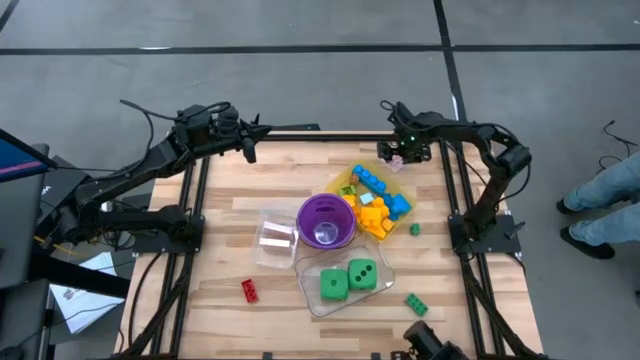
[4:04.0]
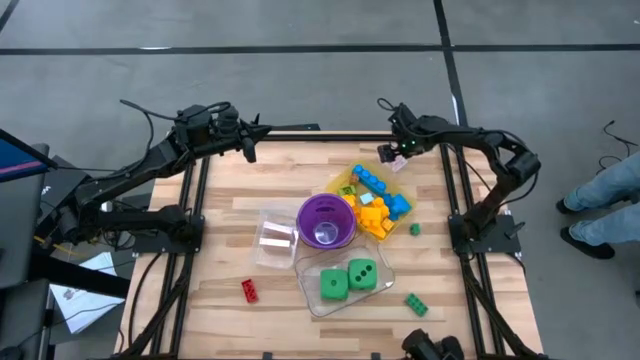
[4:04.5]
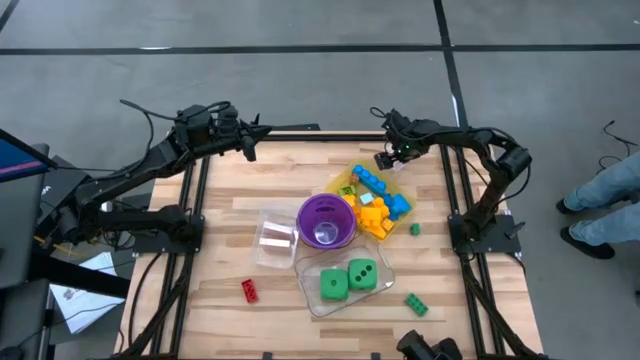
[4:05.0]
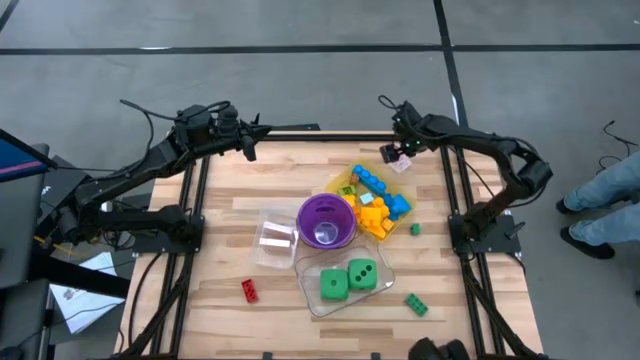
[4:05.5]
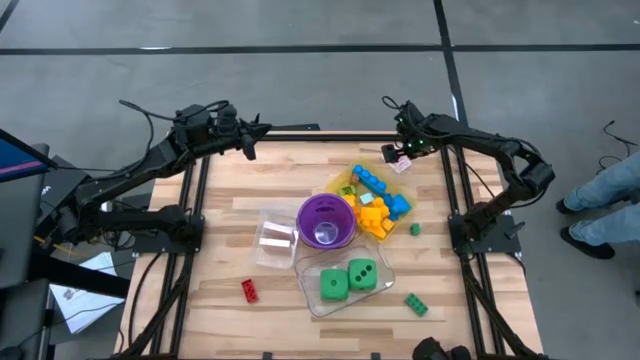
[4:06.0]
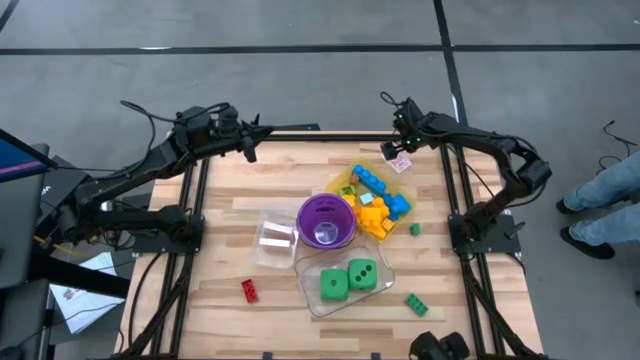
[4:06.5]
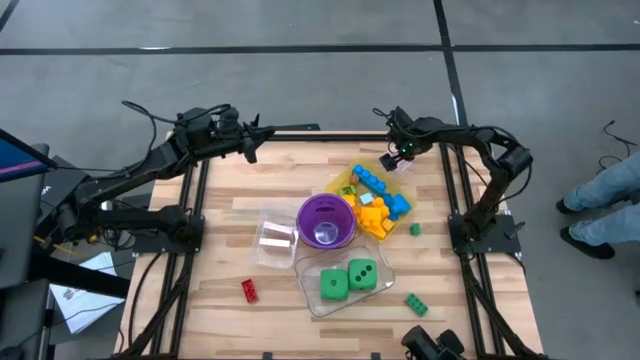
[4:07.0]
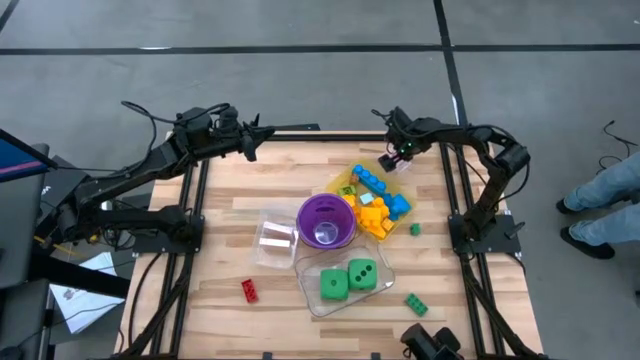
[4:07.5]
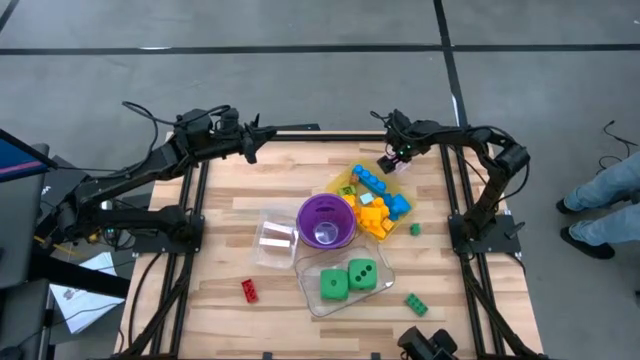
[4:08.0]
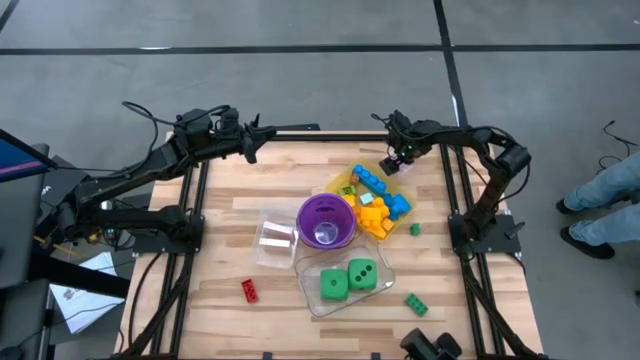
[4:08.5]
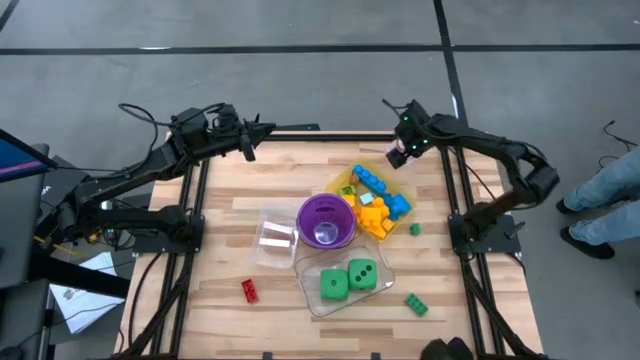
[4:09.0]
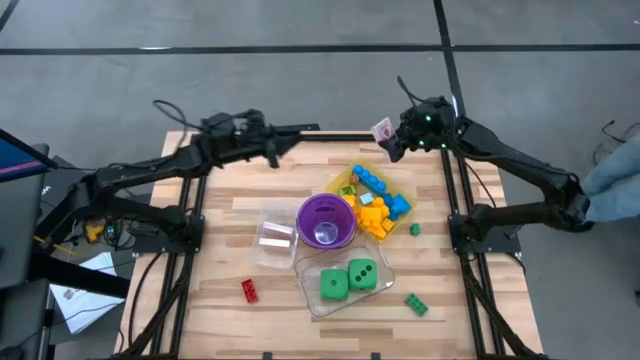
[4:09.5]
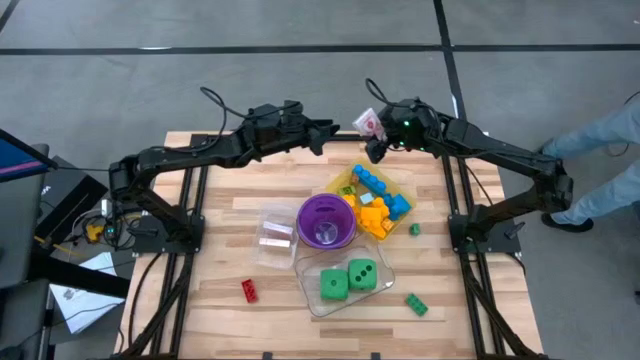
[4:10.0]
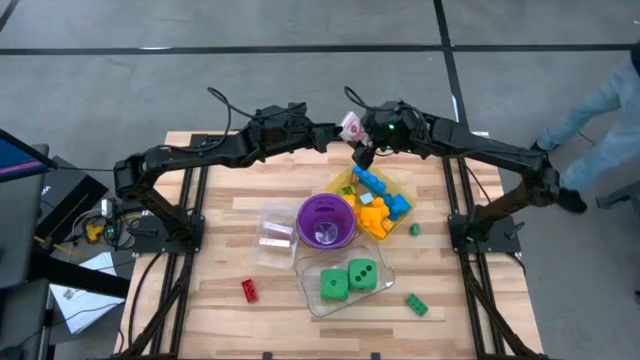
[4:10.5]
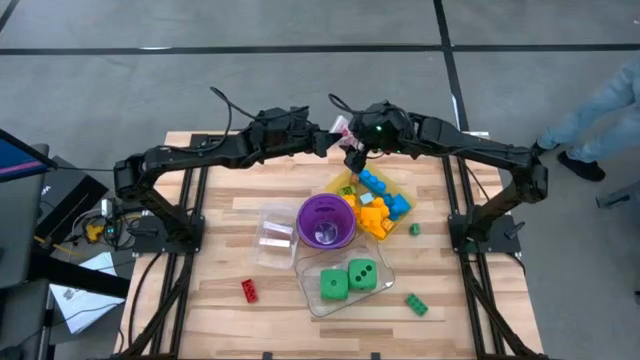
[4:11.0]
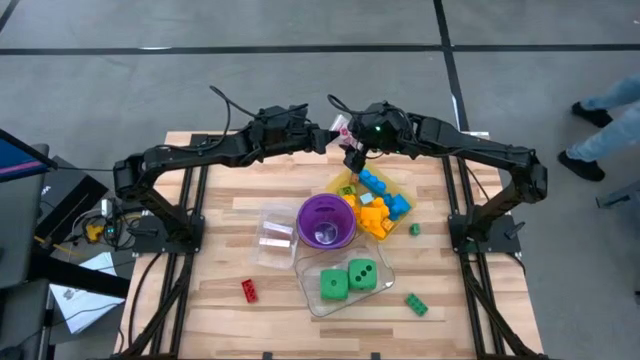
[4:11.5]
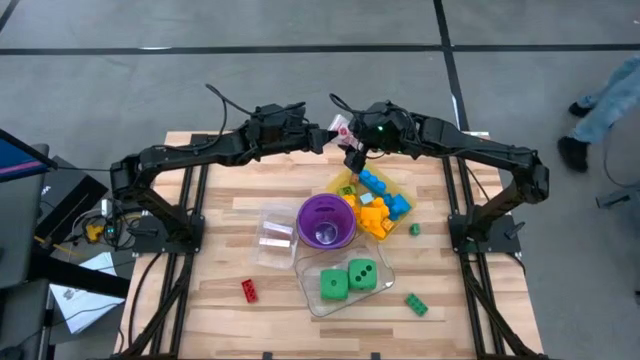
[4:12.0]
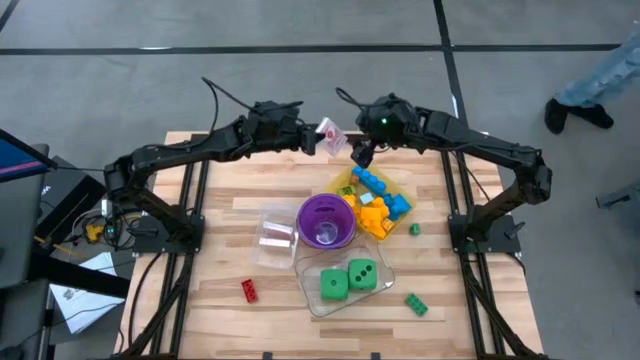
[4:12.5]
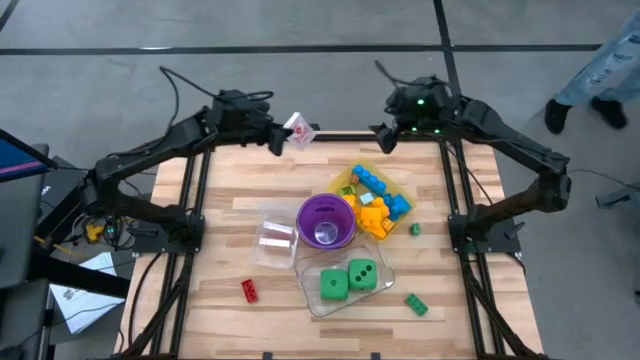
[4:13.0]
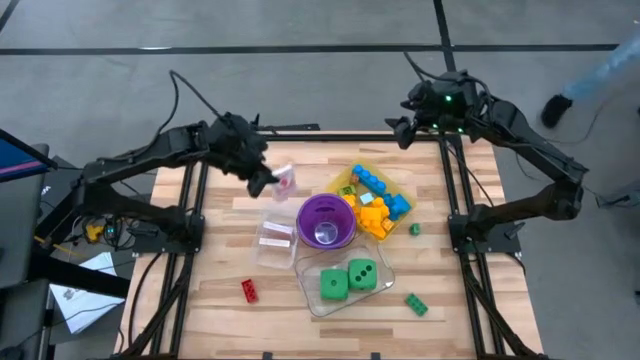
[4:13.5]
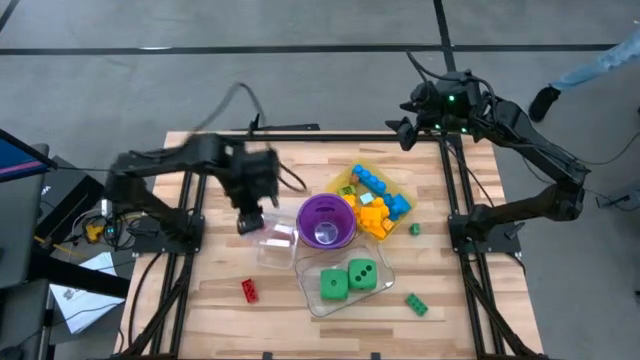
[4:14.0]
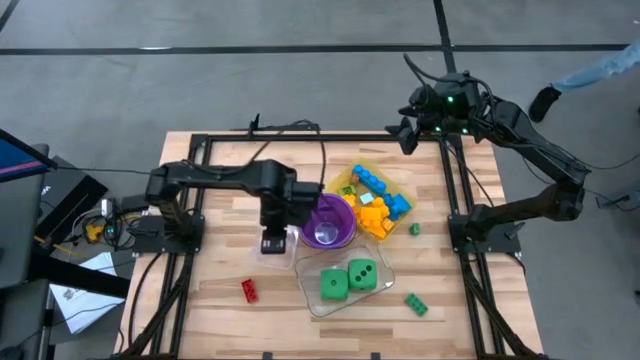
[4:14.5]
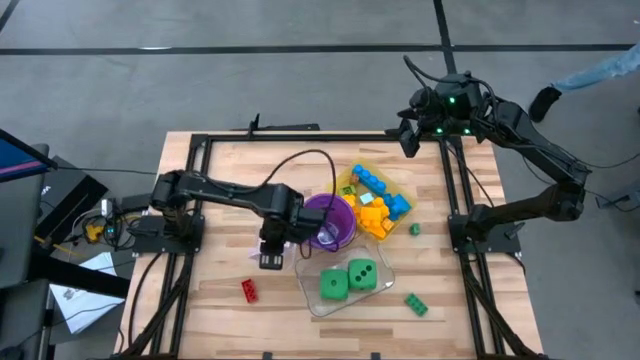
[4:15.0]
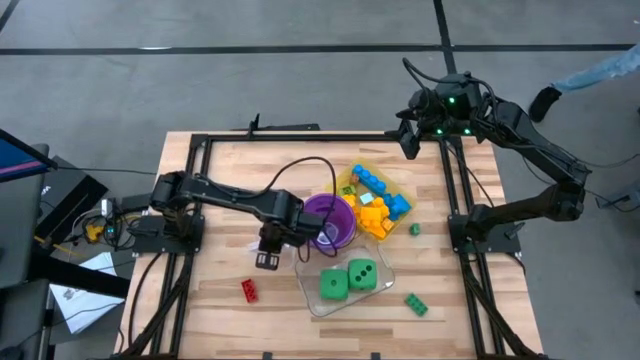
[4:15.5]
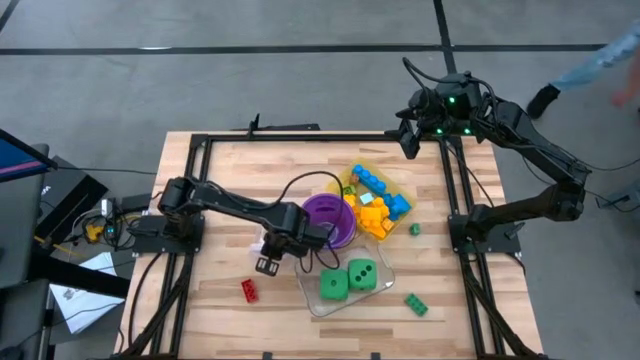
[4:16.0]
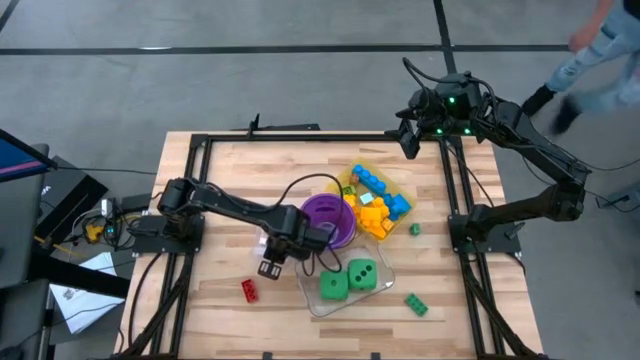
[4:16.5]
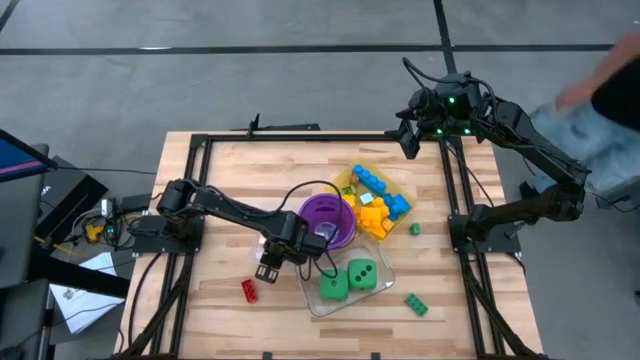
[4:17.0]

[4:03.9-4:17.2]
Task: Pick & Place Toys
Put the red deck of cards into the white bin

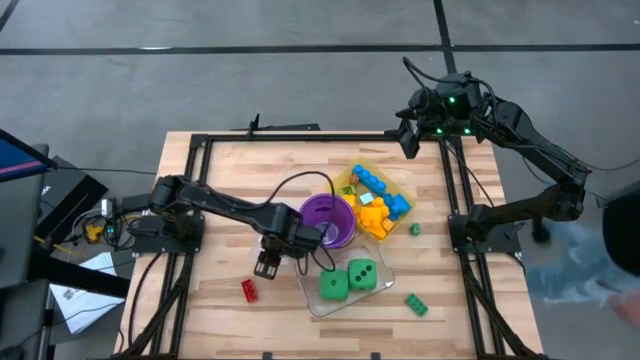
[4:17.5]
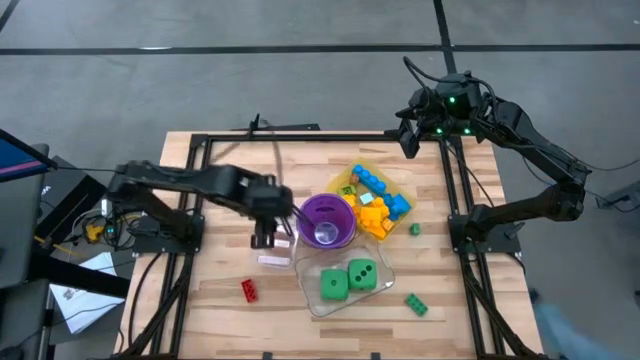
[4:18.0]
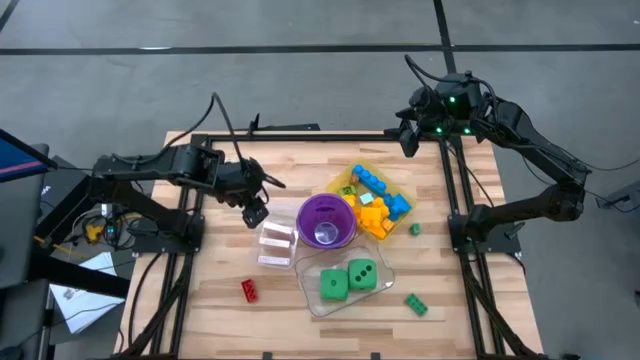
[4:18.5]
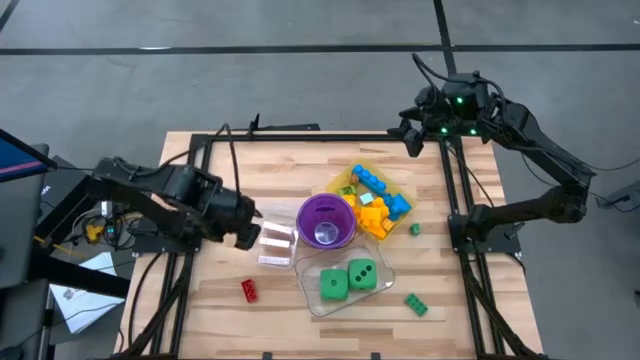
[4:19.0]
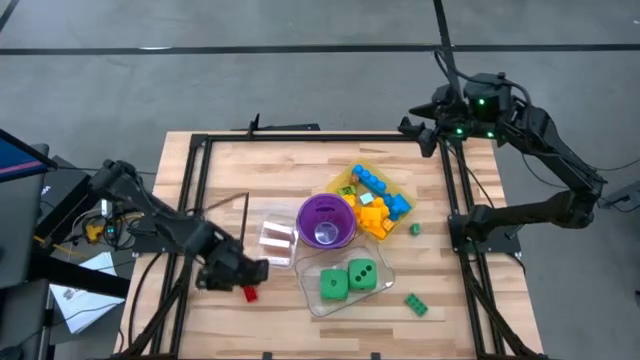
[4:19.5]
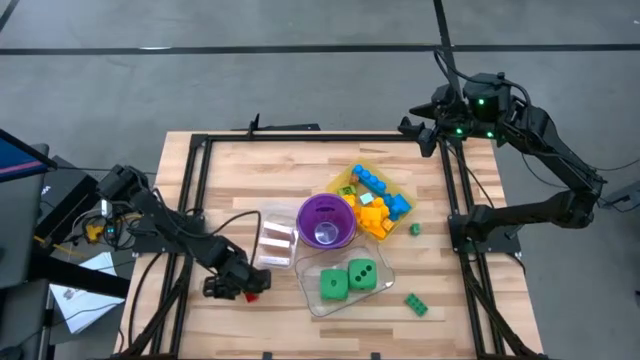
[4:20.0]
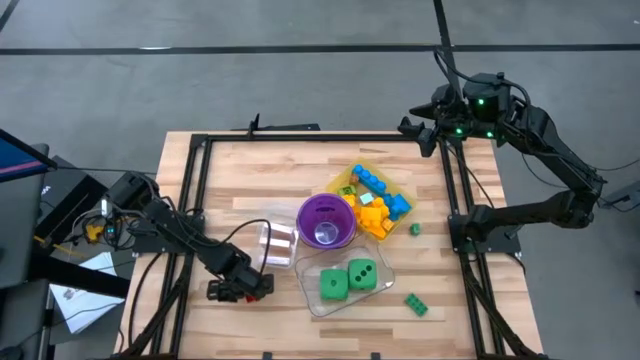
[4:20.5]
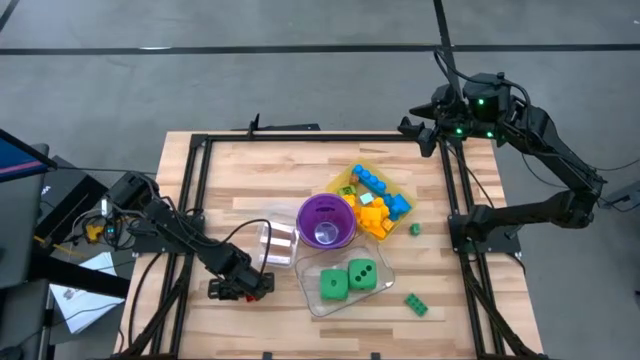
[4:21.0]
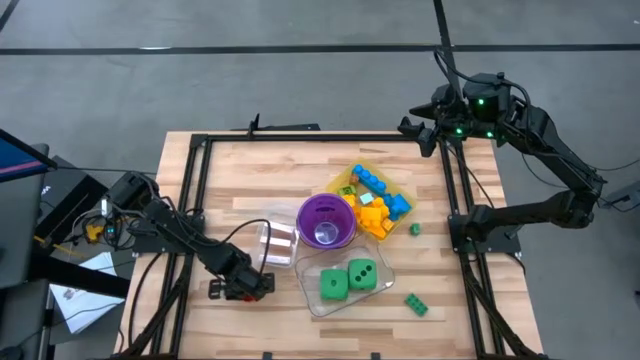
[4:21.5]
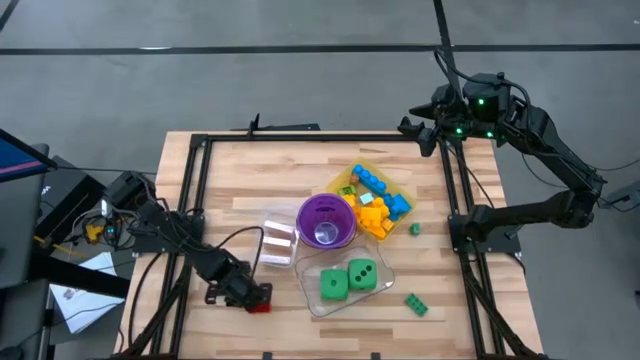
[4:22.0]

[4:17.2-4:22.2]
Put the red game piece into the yellow bin
